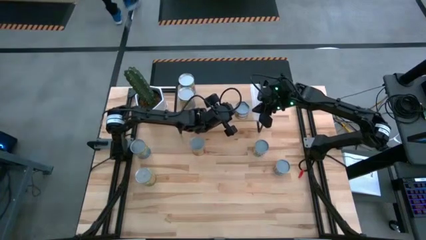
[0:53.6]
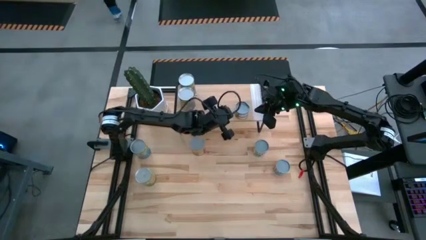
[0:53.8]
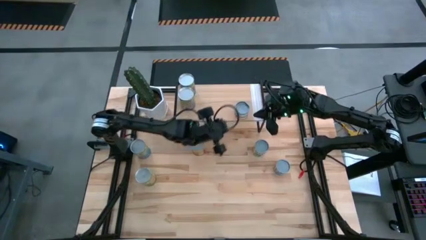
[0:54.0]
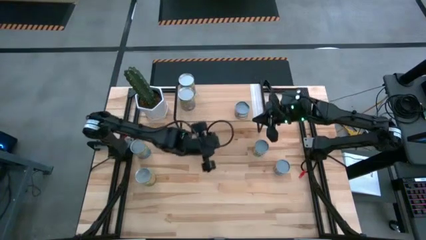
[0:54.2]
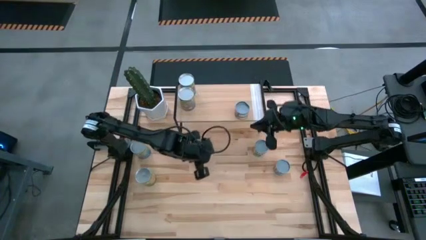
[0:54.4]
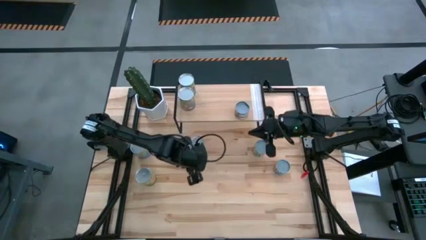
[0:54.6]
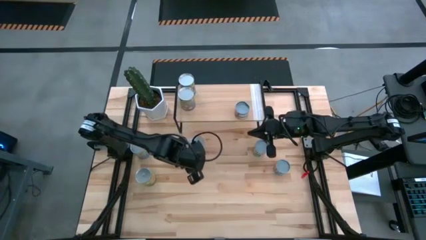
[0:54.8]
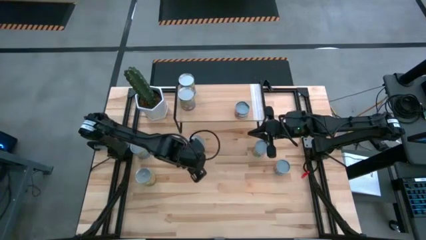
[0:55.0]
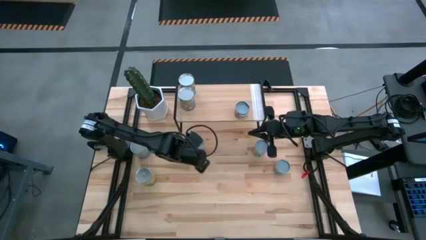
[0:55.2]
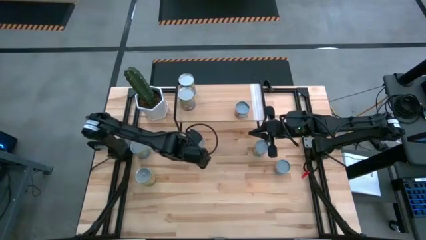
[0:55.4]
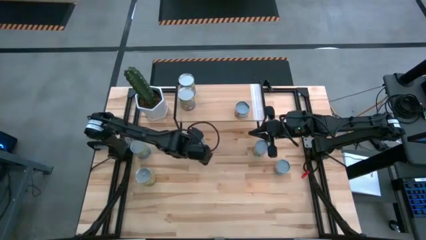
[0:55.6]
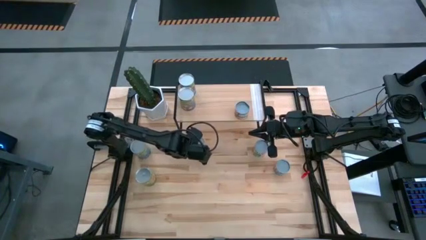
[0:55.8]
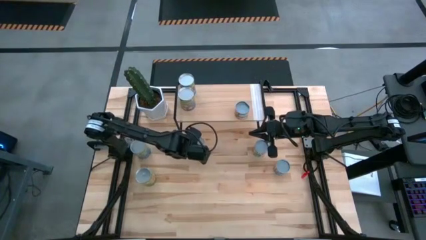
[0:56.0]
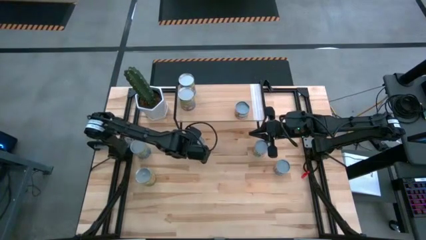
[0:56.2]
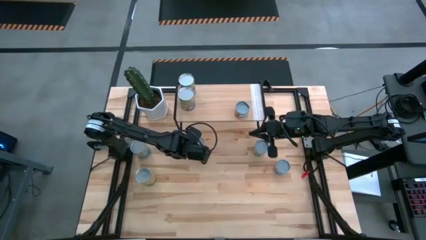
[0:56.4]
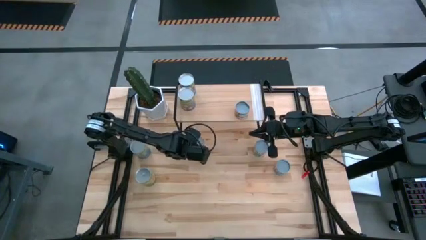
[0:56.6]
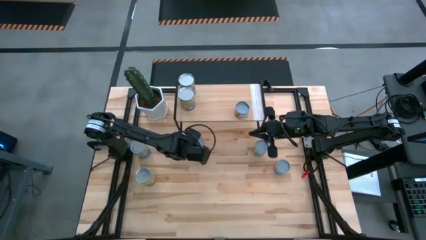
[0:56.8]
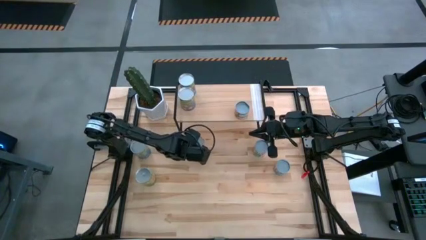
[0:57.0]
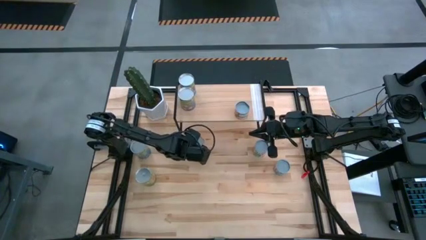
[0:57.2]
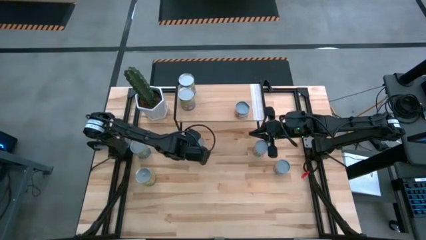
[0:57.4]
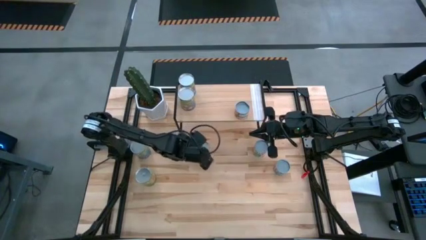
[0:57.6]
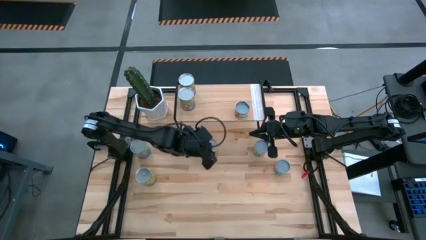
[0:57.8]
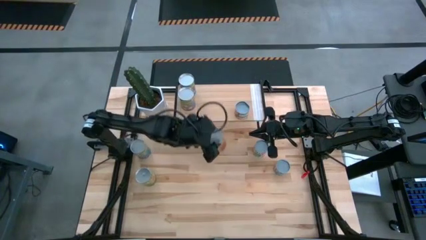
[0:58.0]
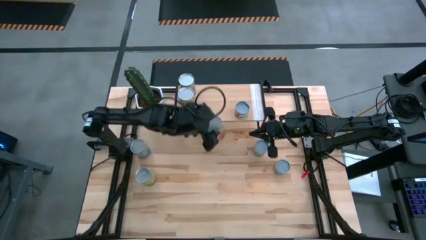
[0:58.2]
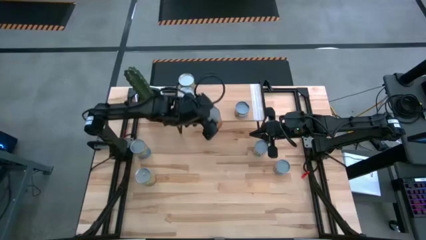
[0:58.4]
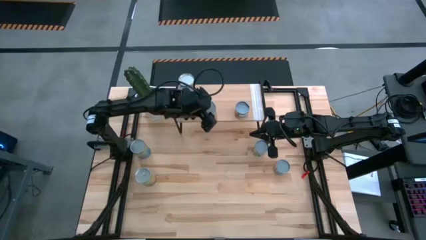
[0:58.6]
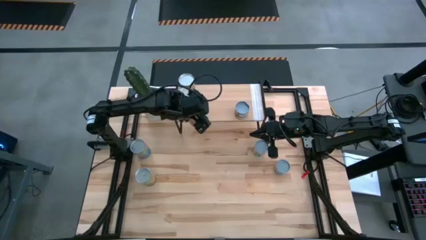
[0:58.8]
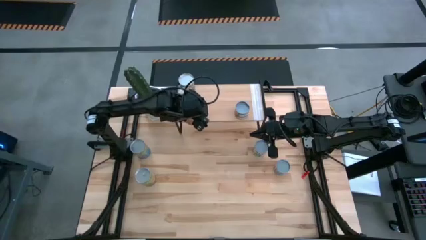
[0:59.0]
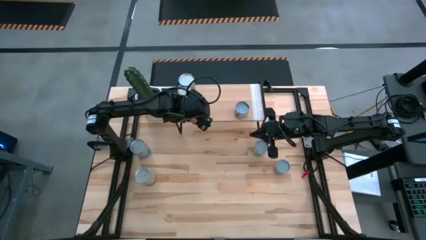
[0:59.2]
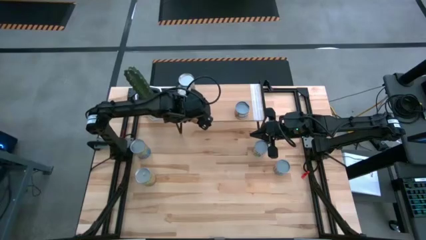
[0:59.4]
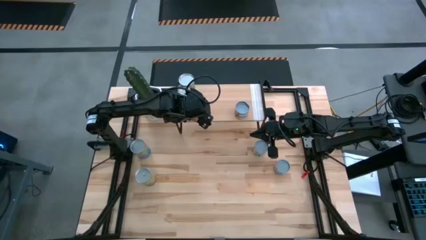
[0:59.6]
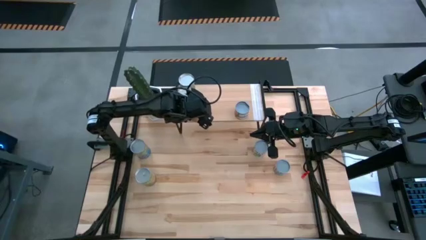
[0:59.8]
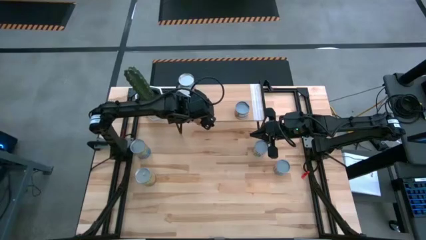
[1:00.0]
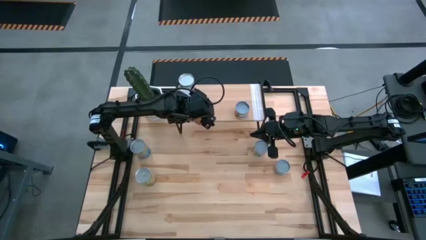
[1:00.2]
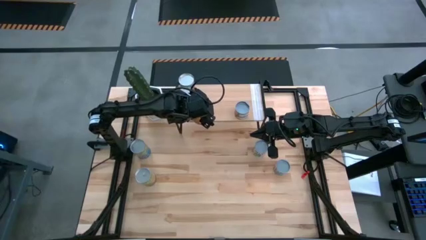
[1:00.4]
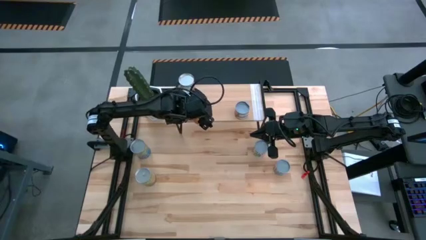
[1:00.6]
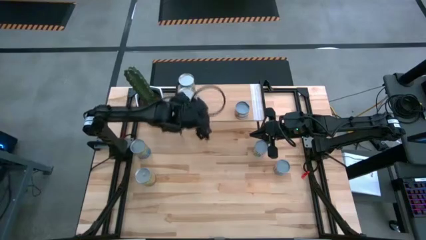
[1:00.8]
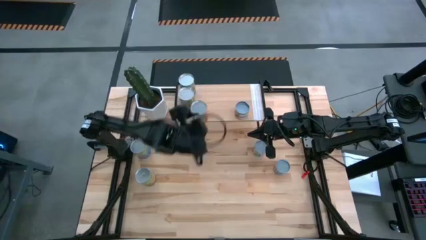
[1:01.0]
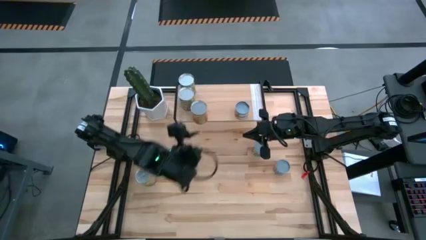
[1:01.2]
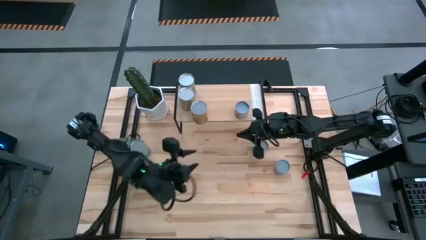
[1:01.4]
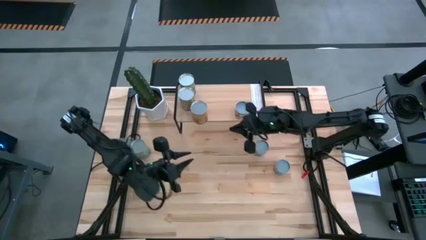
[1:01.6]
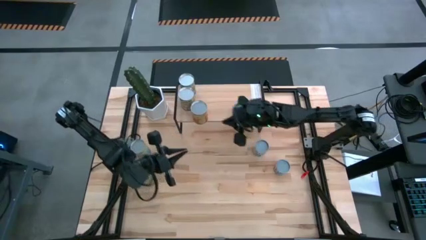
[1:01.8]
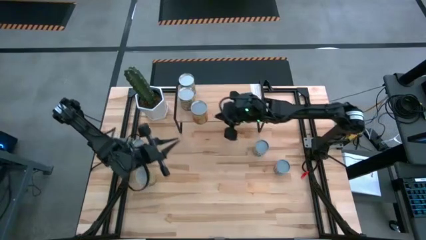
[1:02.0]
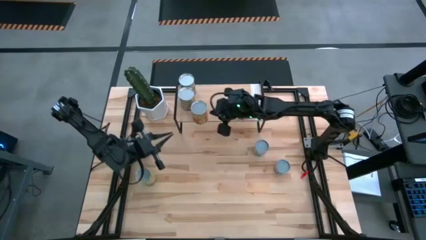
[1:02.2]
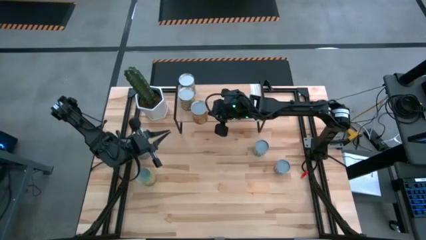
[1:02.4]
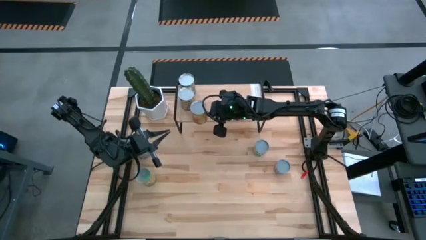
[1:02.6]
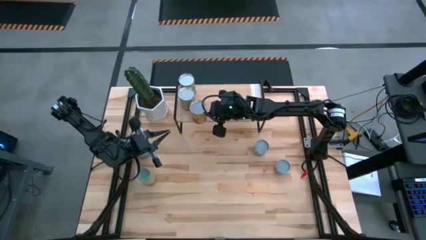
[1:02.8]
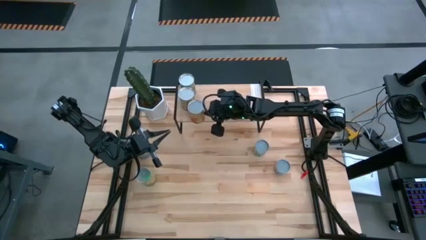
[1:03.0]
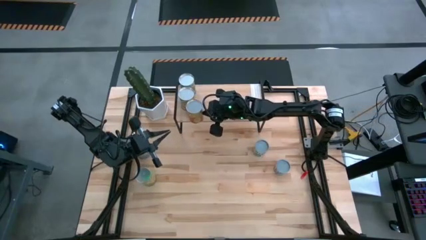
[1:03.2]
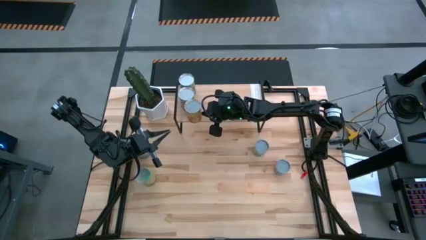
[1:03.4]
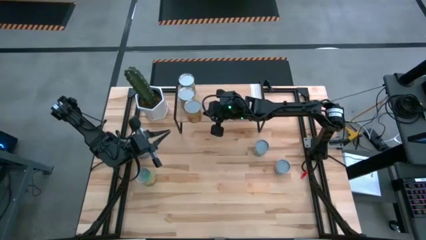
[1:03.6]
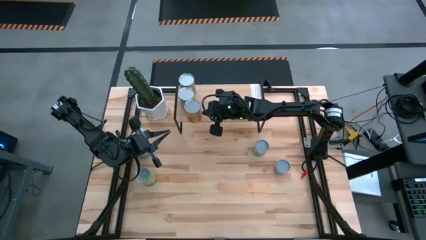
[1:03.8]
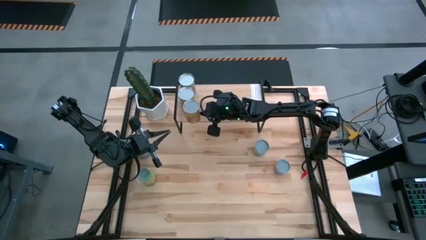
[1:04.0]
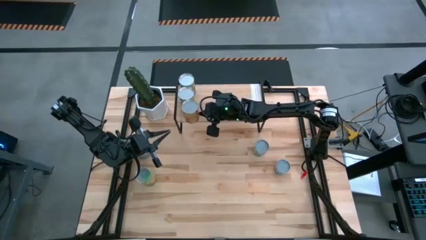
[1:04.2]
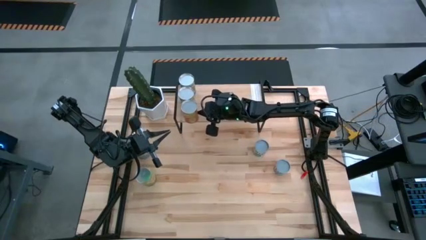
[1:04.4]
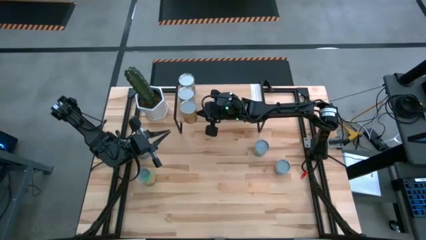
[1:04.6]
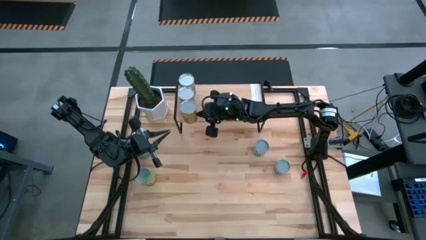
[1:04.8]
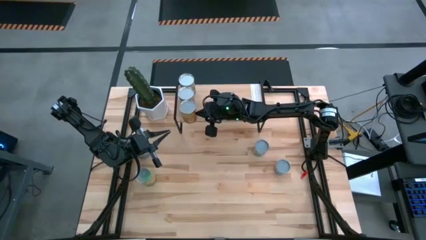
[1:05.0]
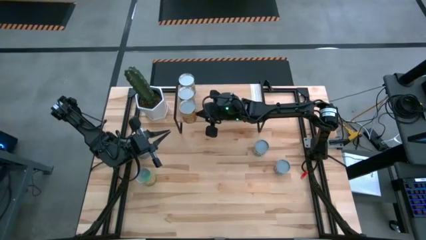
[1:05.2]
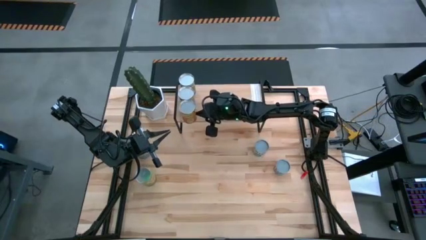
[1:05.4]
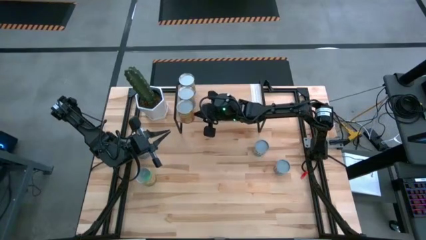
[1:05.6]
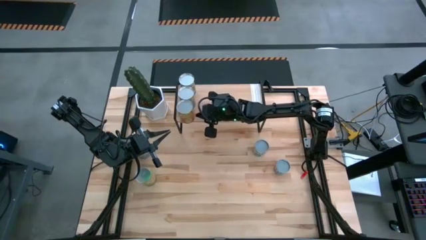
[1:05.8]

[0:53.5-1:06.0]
Task: Pick and place cans onto a shelf
Put the canned pineapple on the shelf

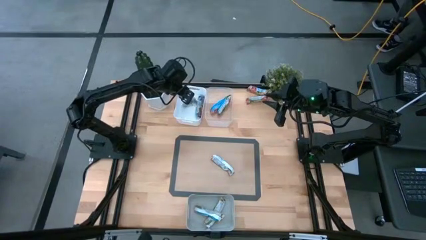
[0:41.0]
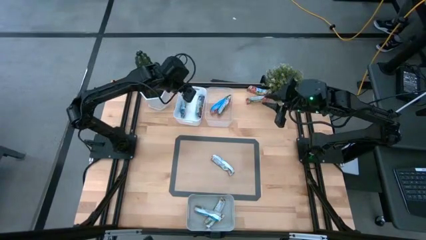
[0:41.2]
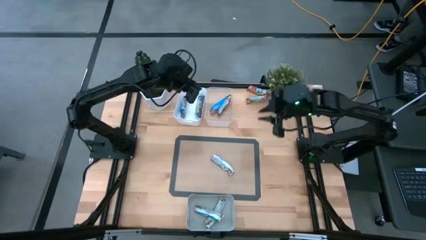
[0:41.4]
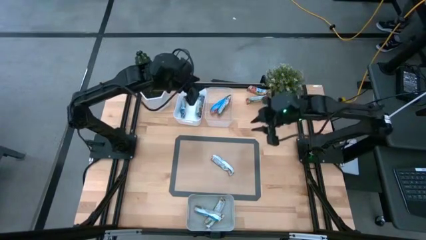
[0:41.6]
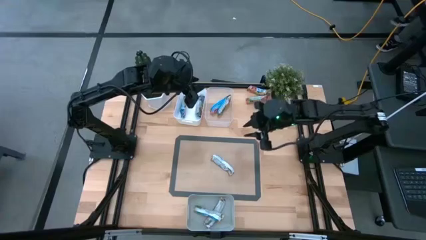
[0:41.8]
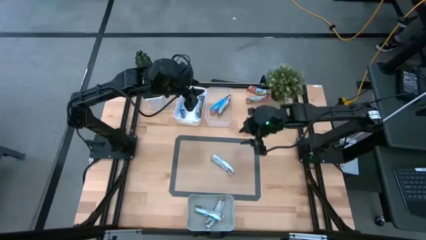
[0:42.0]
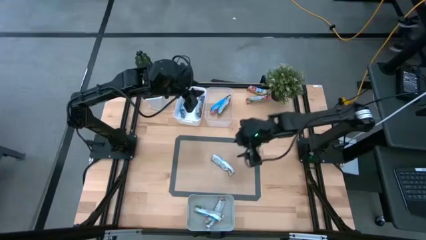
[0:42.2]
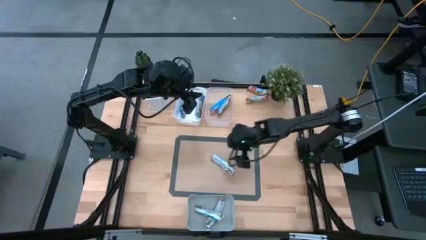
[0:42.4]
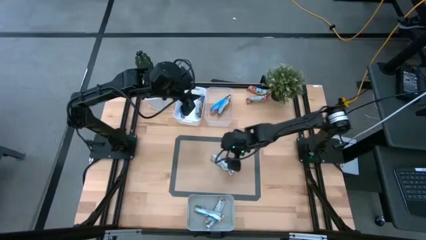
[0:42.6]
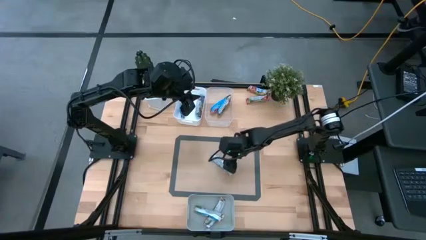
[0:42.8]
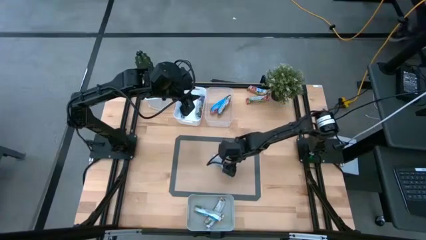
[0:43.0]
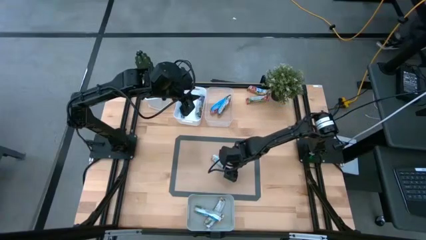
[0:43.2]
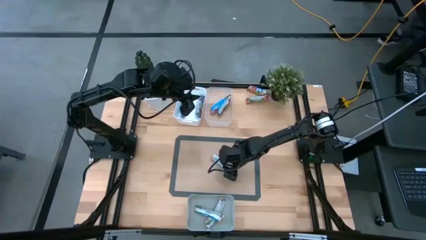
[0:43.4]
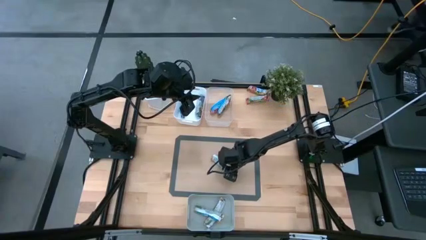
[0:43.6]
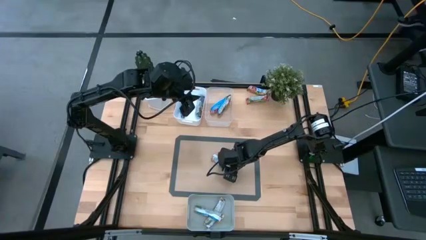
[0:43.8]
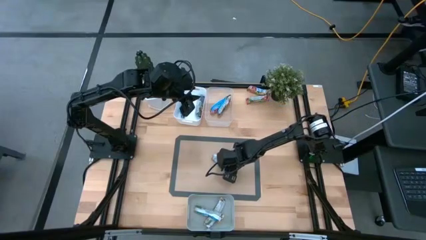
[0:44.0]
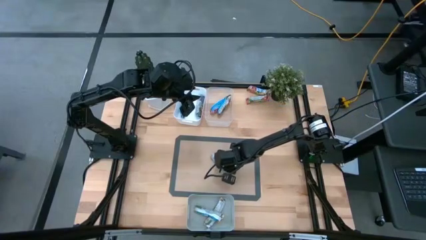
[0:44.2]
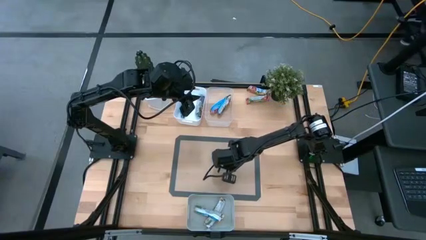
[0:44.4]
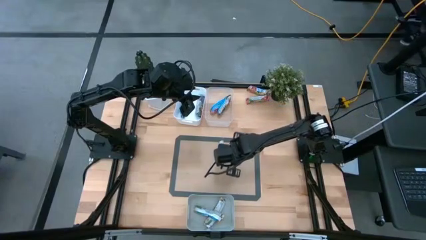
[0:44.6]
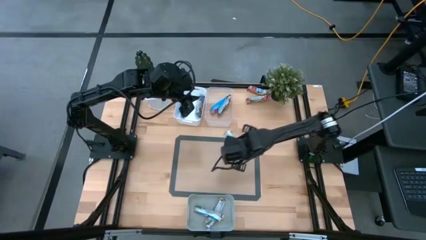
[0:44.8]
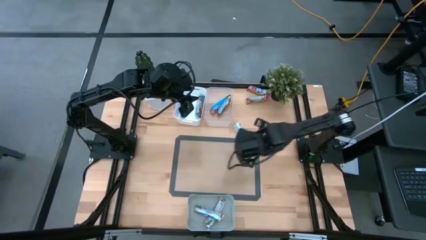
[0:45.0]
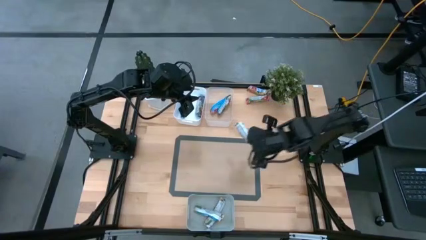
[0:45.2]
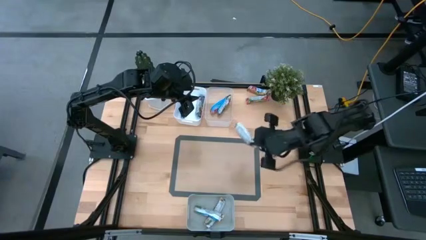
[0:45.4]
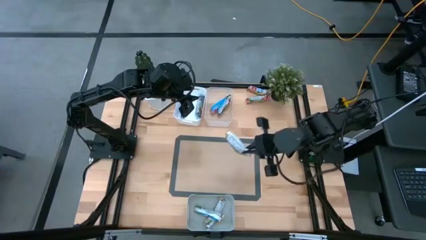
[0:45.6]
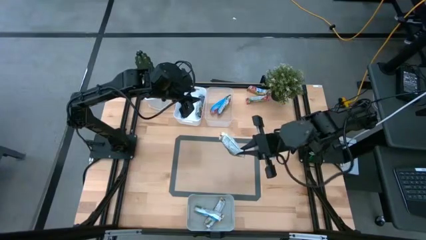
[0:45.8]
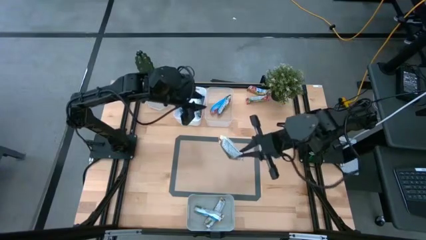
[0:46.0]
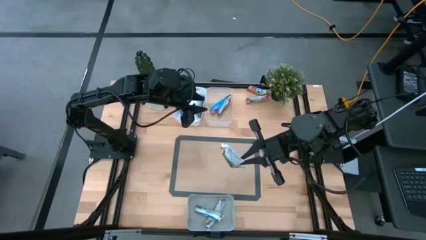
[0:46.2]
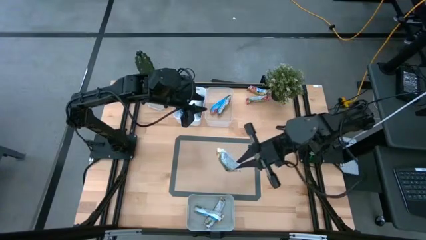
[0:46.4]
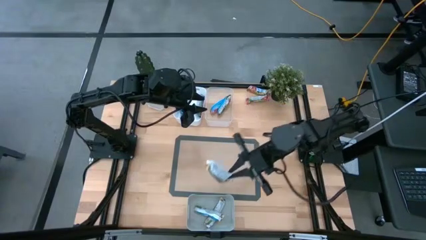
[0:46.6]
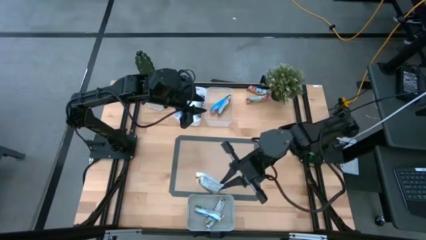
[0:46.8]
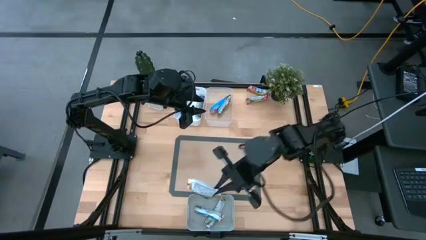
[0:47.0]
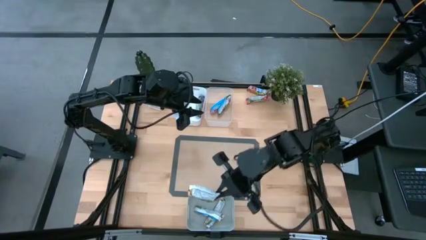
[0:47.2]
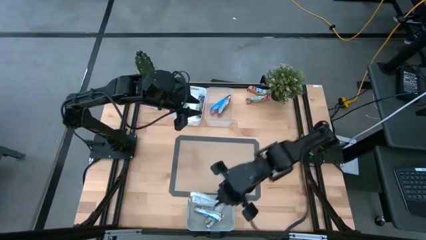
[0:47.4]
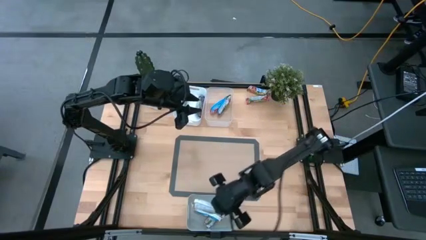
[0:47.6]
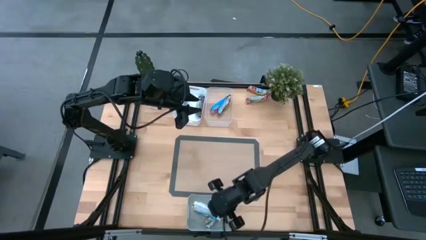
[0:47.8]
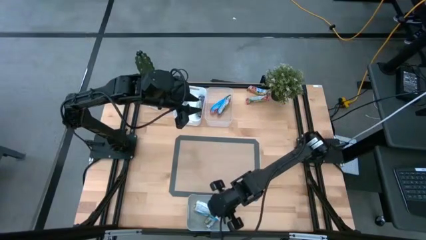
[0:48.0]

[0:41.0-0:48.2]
Task: Pick and place Granola Bars by type
Put the yellow granola bar into the gray bin
